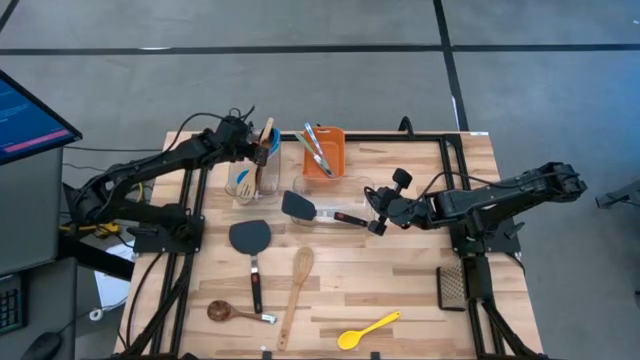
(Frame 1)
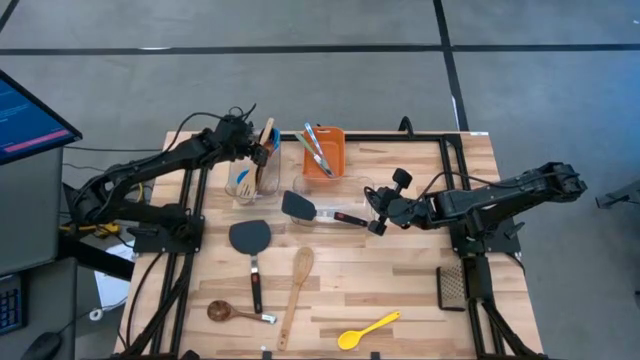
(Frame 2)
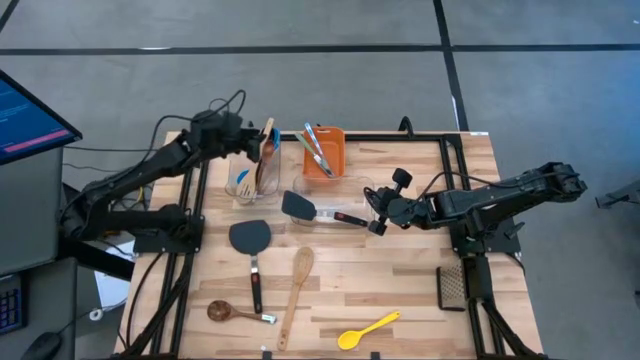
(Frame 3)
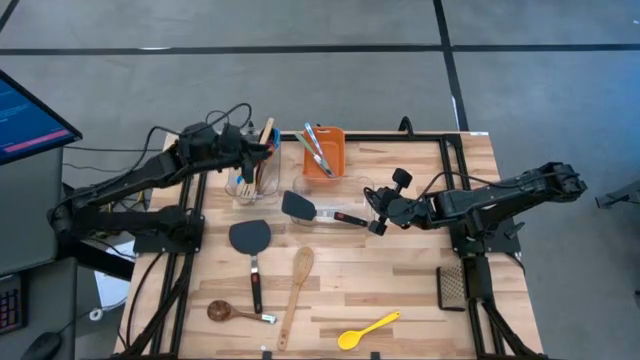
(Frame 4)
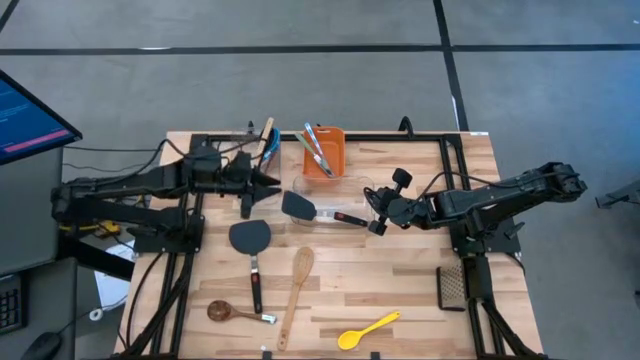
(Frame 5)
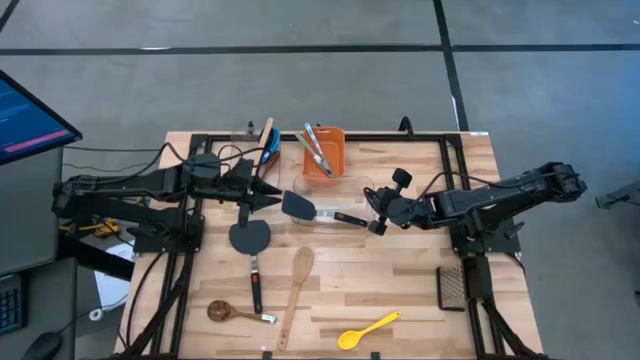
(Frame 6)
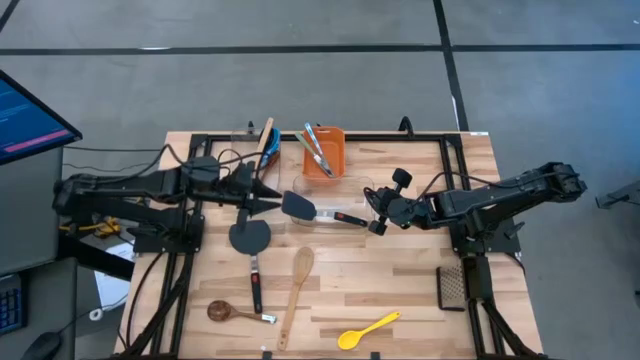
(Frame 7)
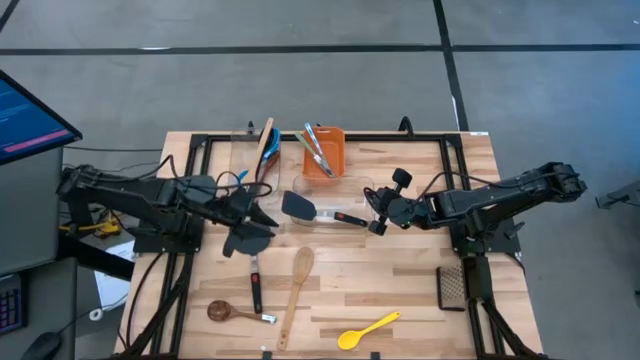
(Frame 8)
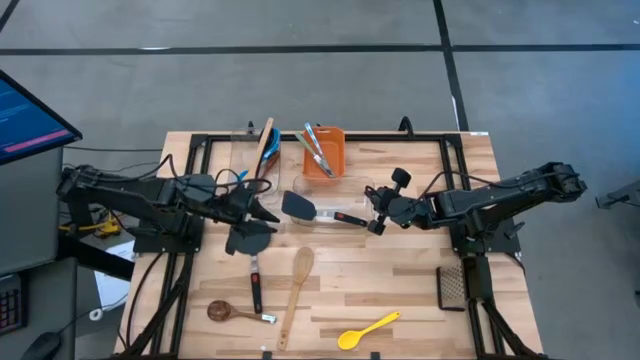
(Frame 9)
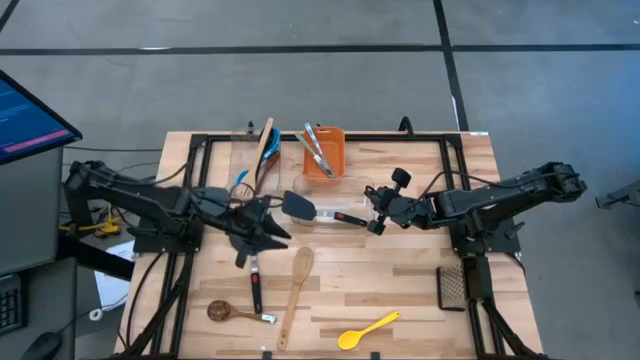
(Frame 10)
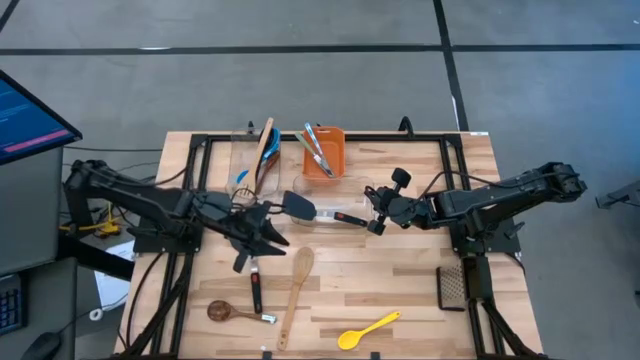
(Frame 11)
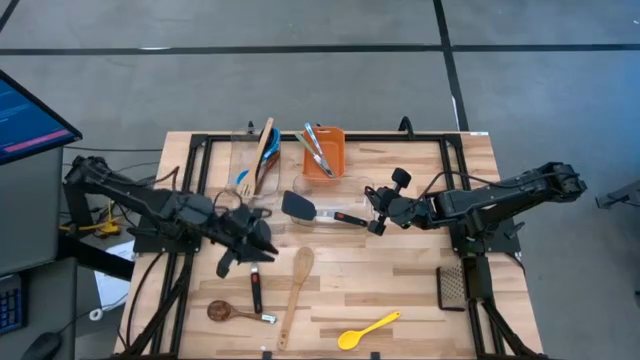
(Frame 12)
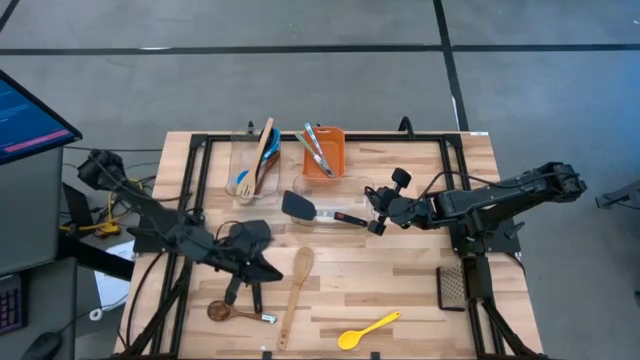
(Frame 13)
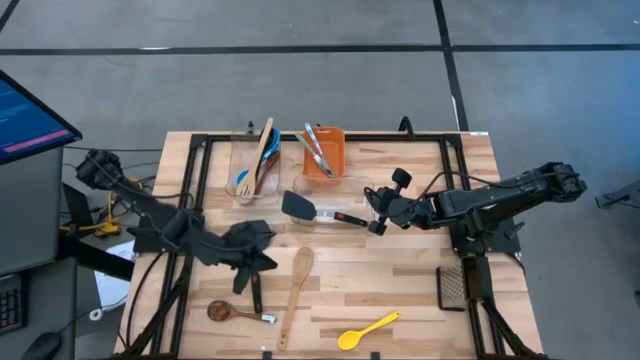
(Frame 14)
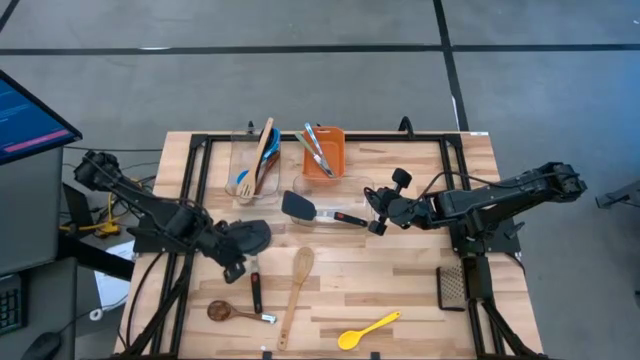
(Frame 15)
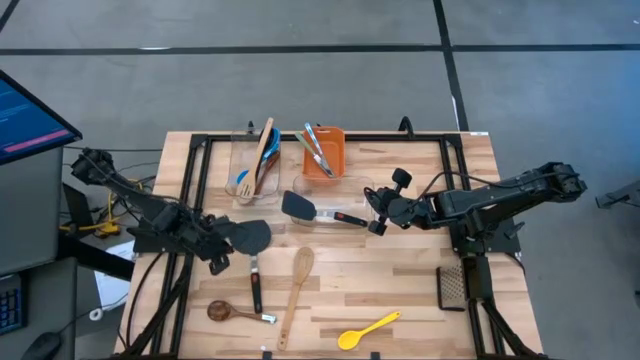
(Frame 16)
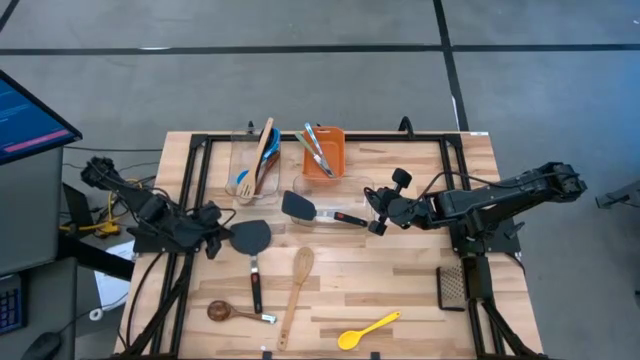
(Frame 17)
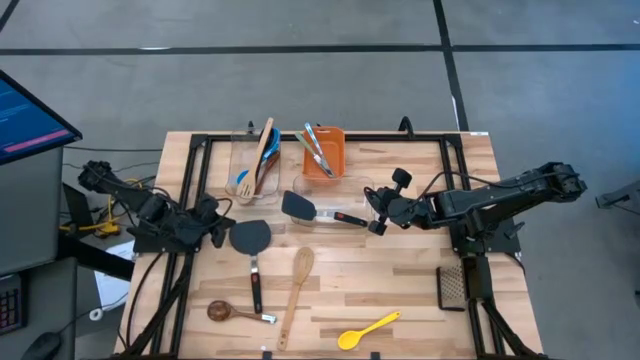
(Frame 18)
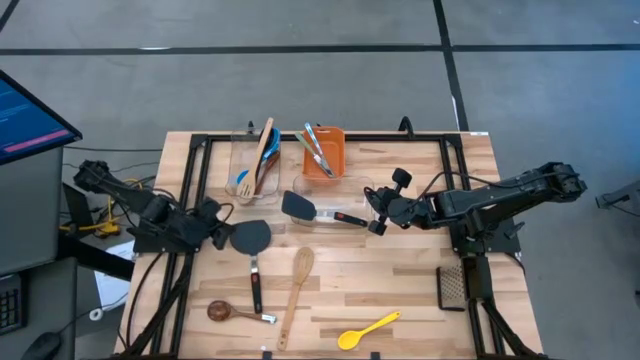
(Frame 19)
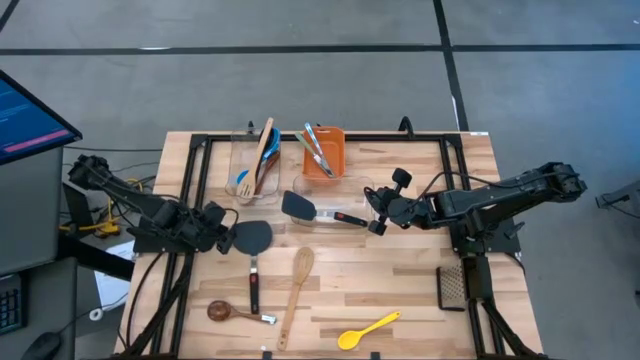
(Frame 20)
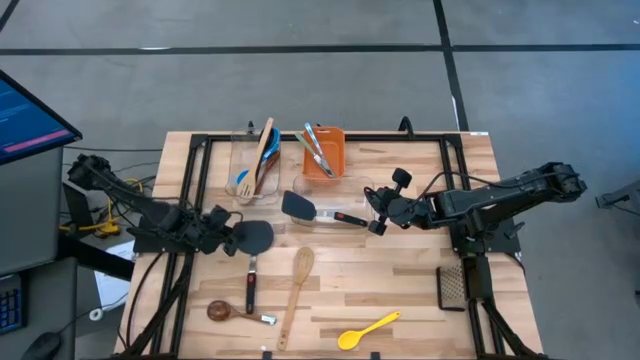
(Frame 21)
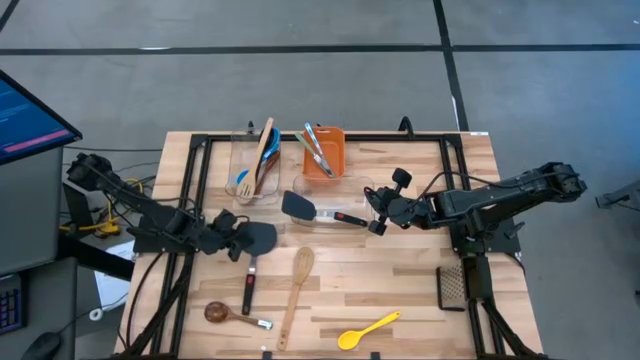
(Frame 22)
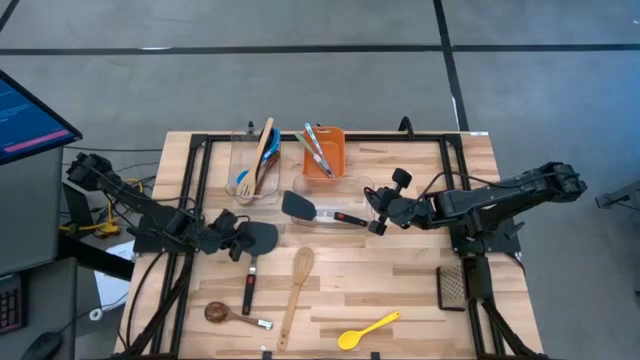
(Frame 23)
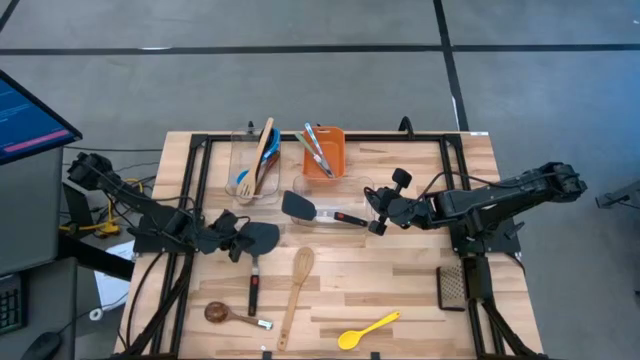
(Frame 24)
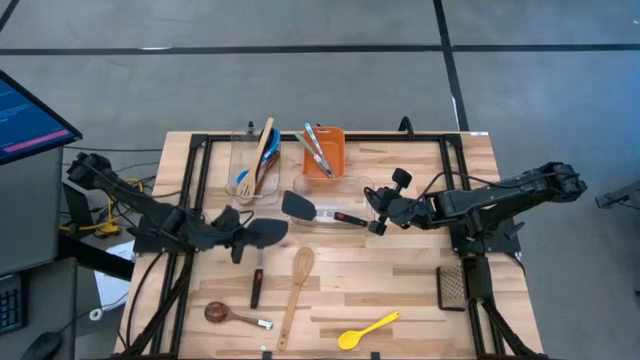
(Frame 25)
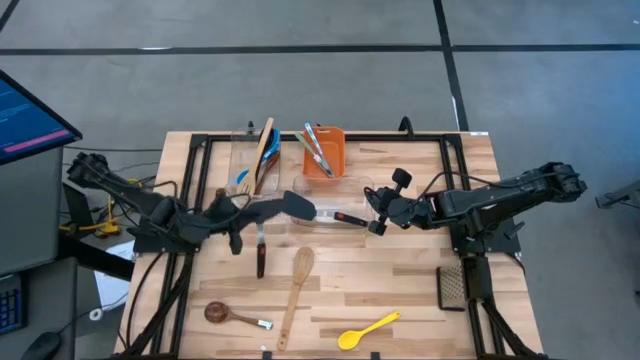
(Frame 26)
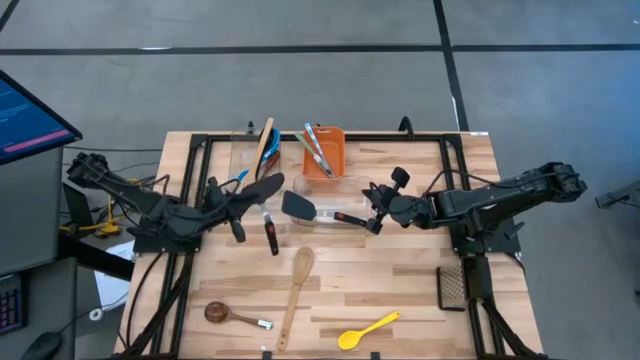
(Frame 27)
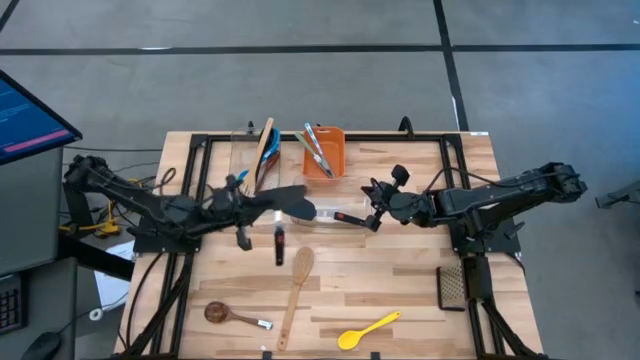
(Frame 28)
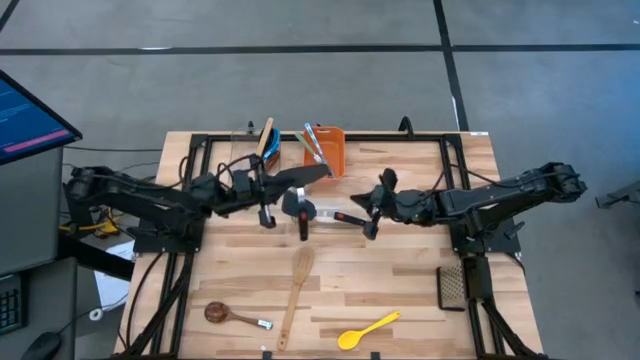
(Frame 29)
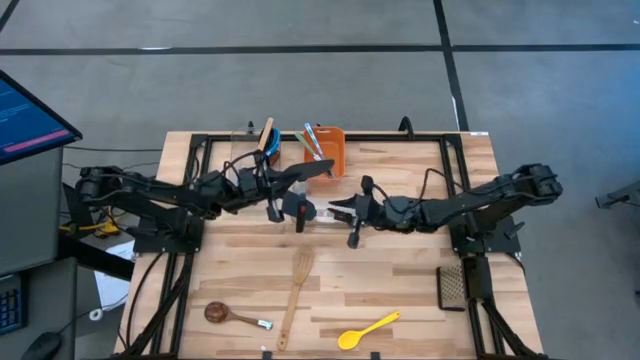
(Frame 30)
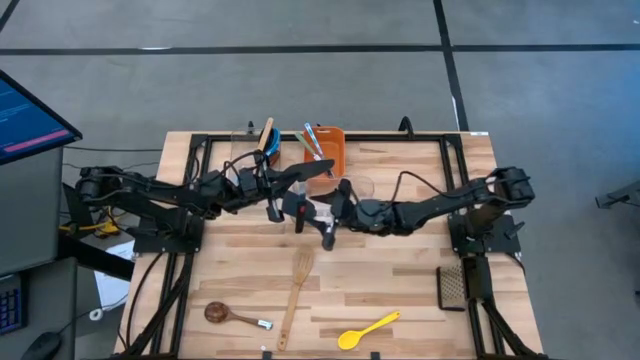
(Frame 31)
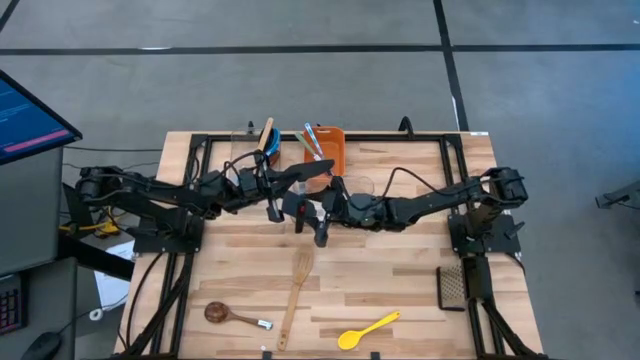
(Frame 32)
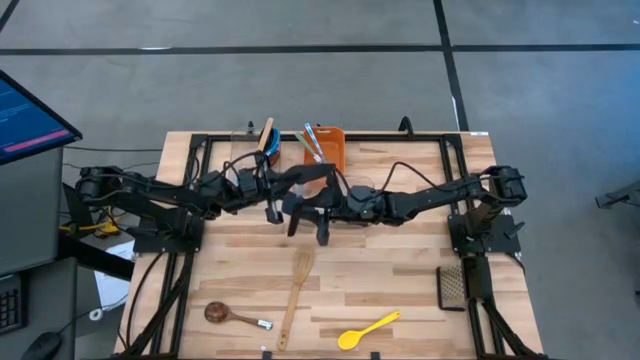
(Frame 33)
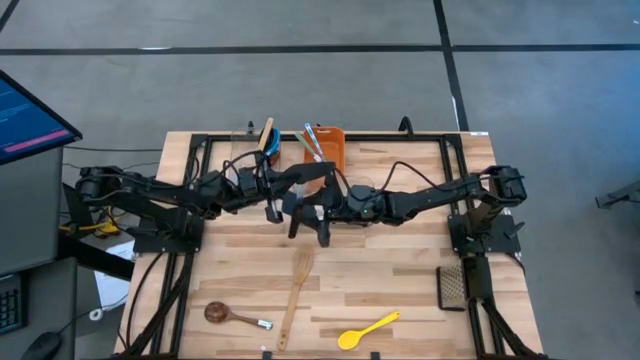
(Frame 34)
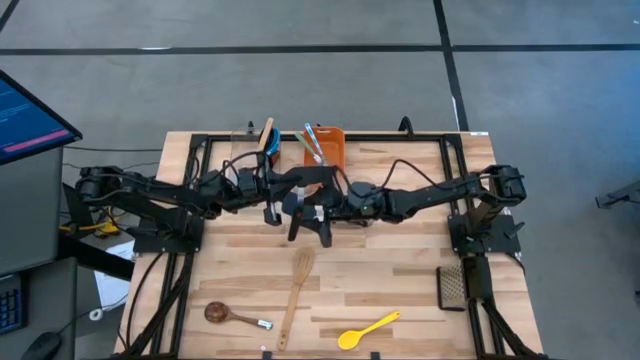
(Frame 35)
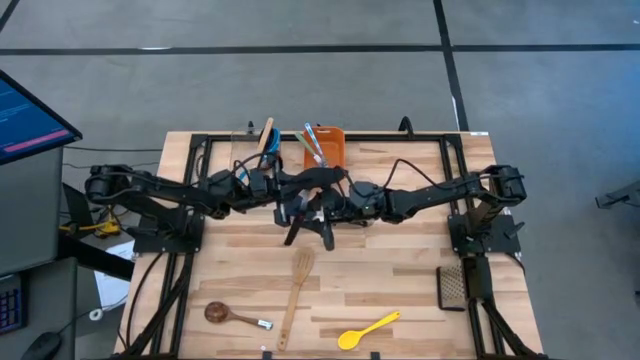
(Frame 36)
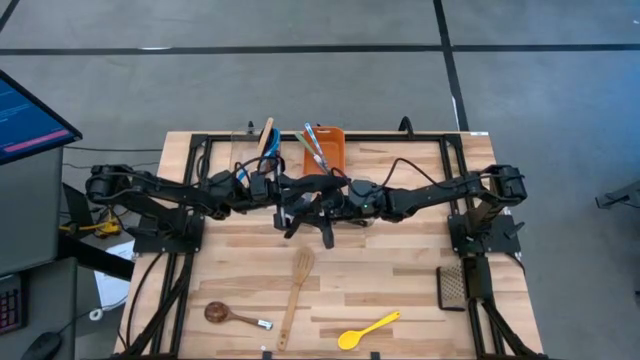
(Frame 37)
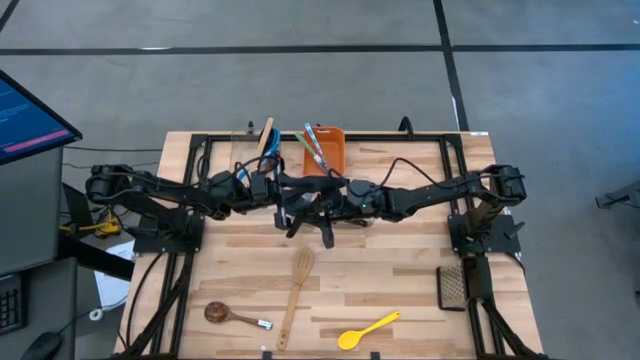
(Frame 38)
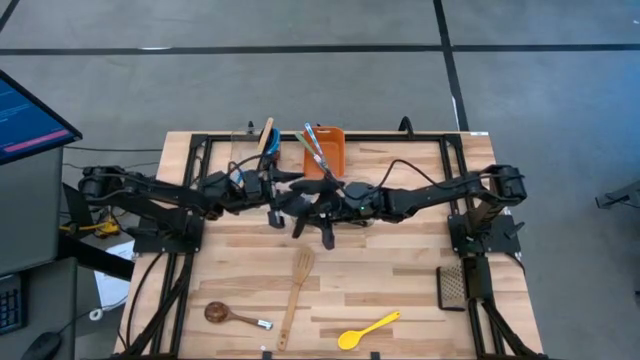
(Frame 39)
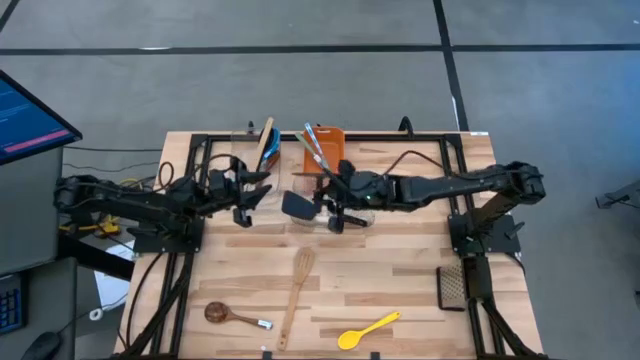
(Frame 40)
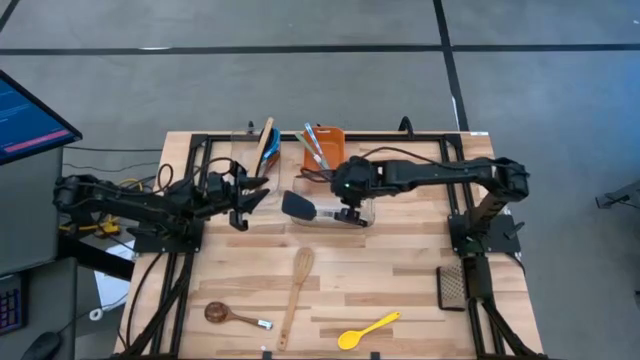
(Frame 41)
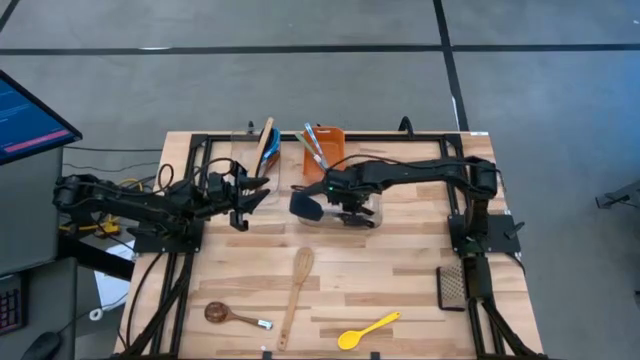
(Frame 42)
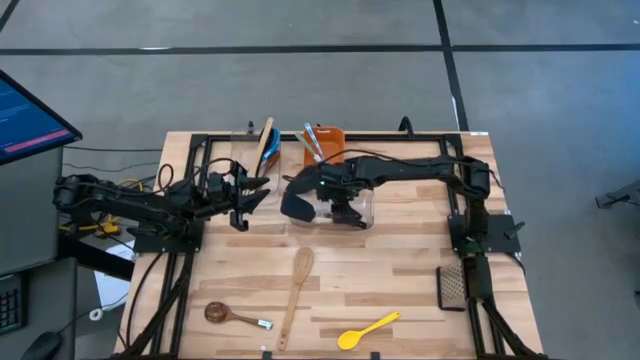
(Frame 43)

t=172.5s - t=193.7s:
Task: Pick & Place Kitchen Items
Put the black turner spatula into the bottom transparent bin

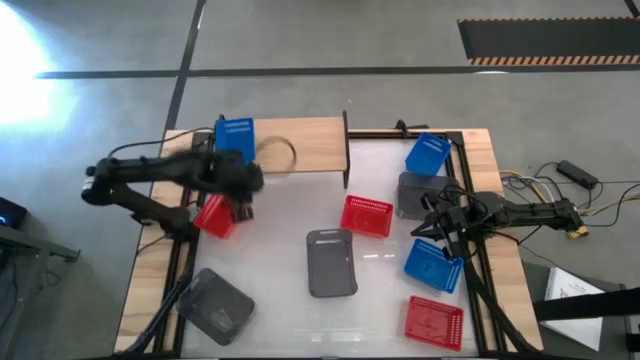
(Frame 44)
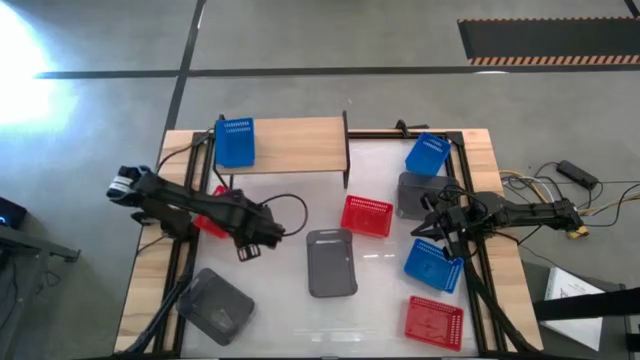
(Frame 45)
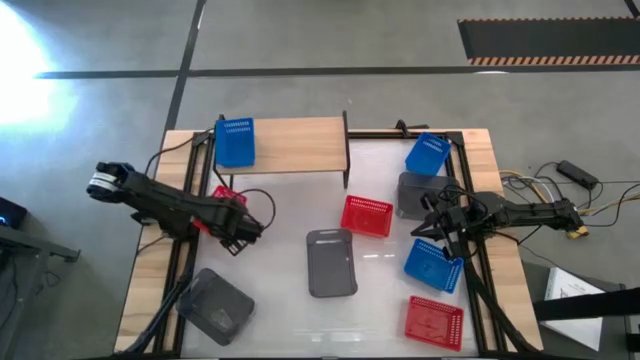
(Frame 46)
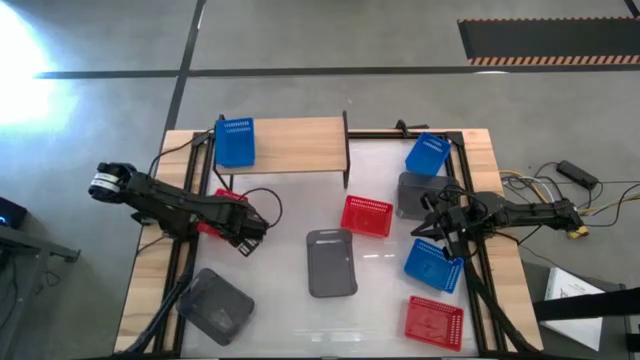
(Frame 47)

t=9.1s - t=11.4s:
Task: Stack baskets on shelf by color
Put the top left red bin on the shelf
